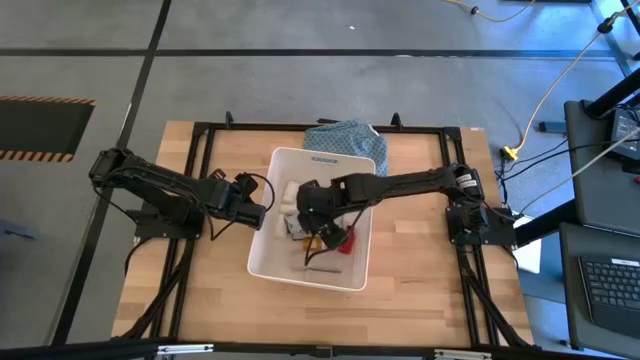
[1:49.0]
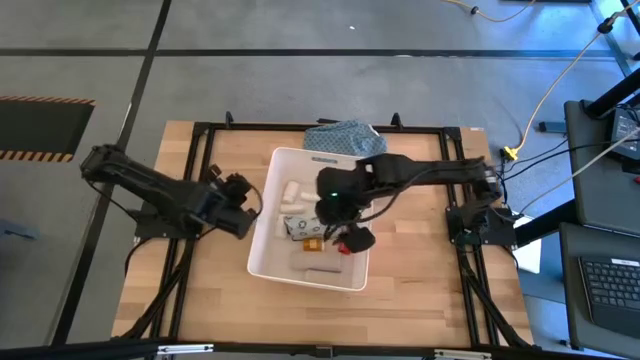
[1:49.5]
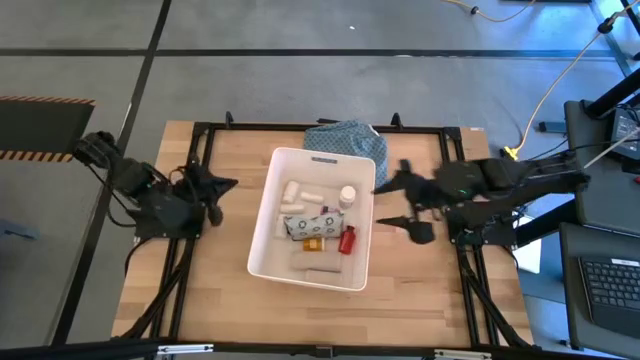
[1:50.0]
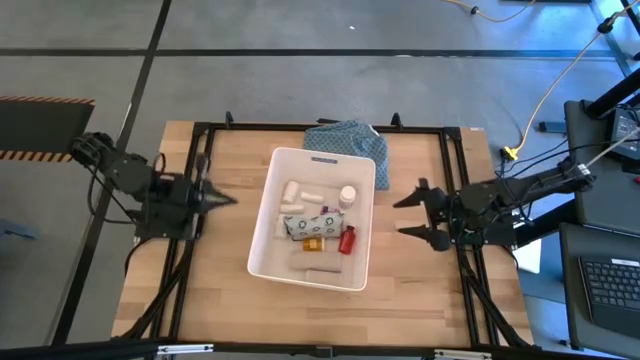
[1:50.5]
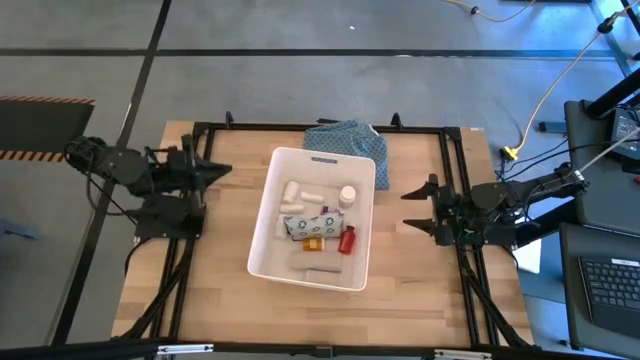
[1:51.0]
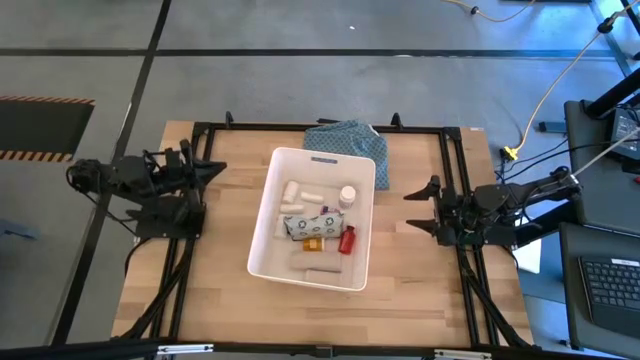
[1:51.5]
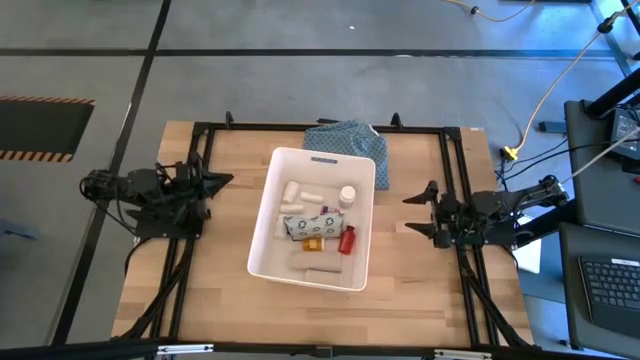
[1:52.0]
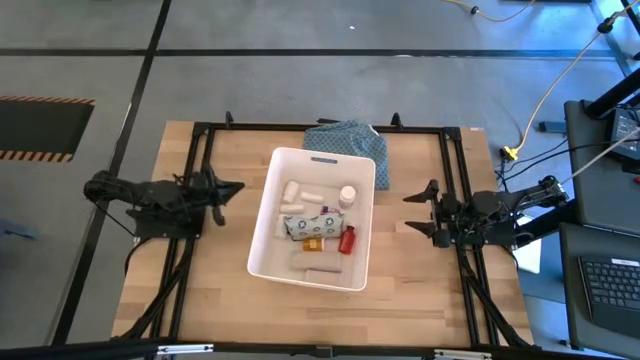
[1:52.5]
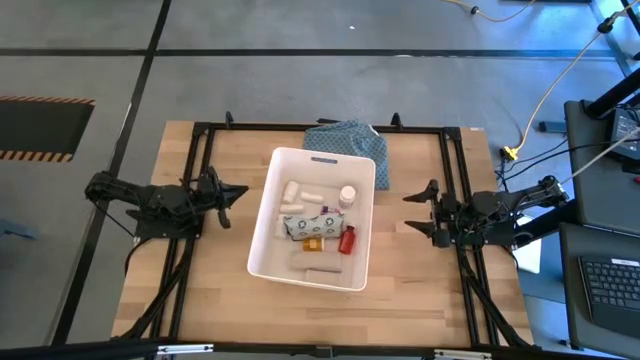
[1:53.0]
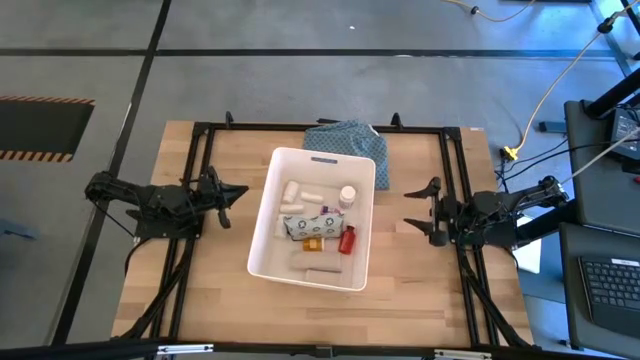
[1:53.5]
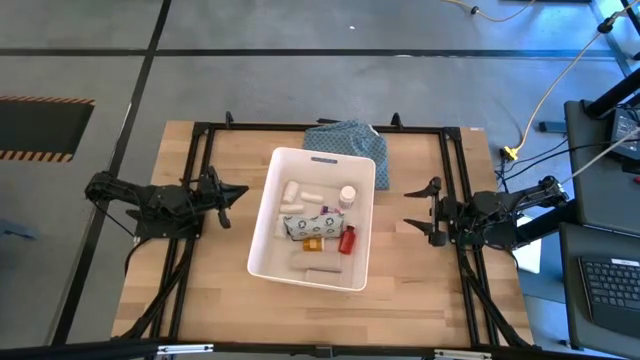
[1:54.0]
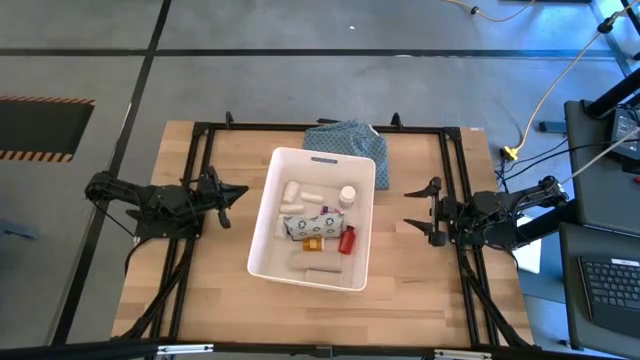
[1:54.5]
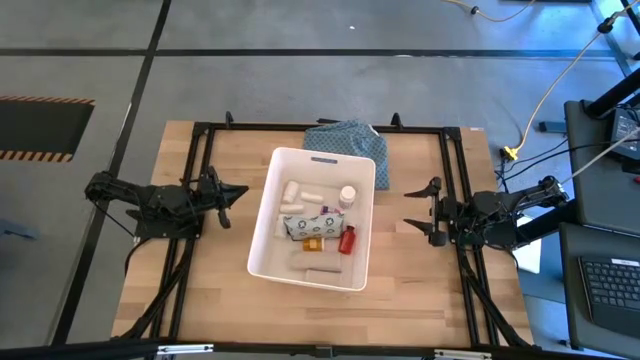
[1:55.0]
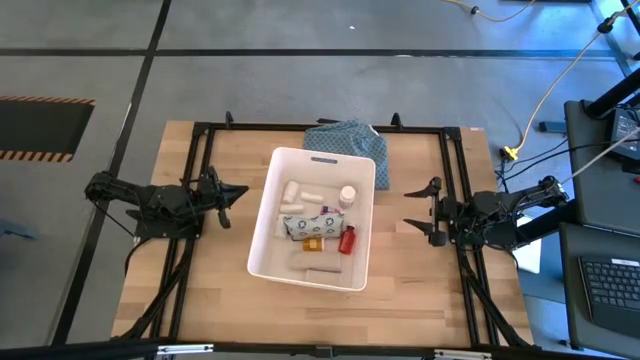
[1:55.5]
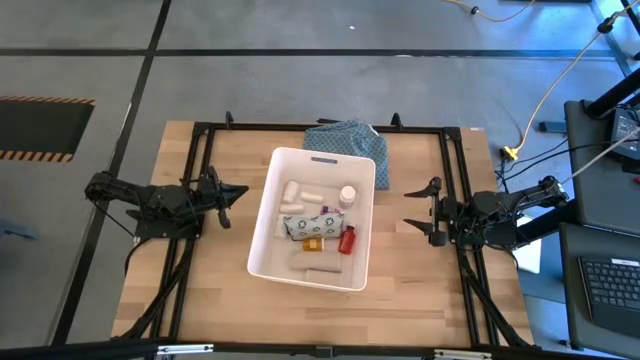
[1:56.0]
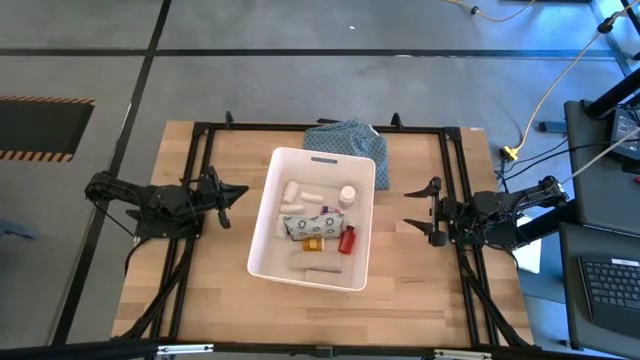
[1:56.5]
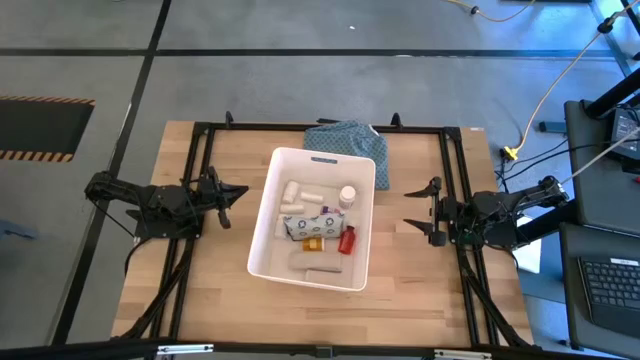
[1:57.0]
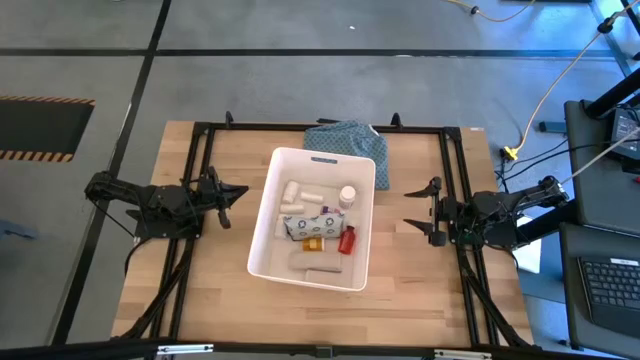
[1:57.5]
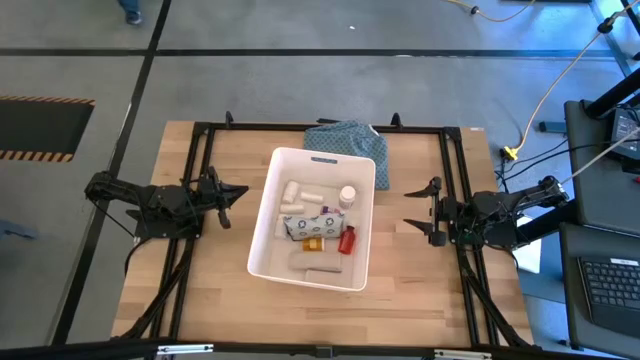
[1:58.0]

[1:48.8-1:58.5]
Task: Pick & place medical supplies in basket/bin
Return to Home Position

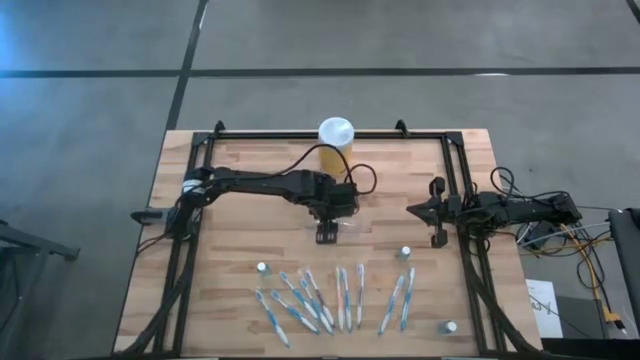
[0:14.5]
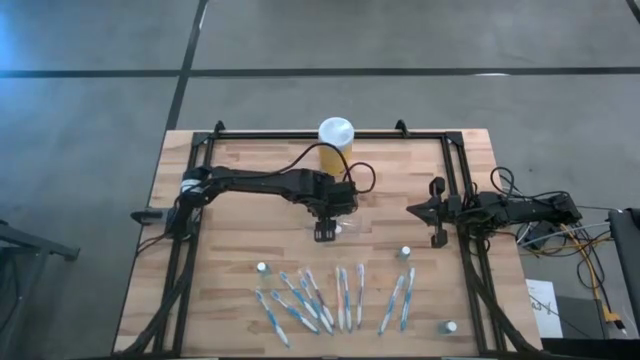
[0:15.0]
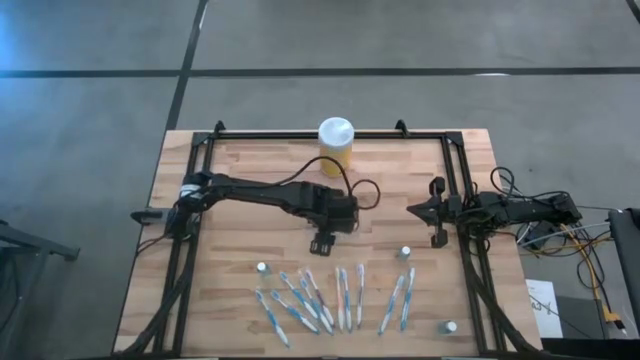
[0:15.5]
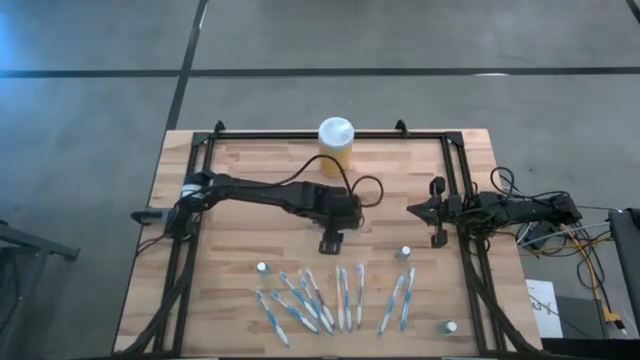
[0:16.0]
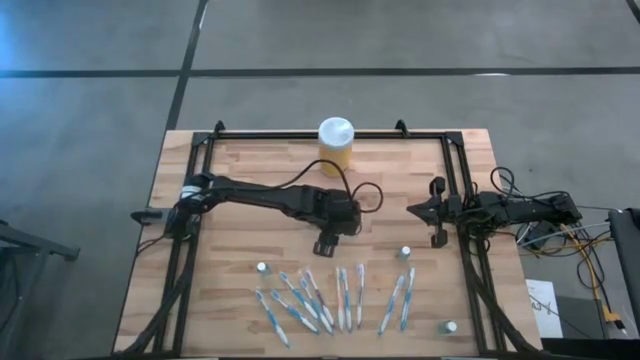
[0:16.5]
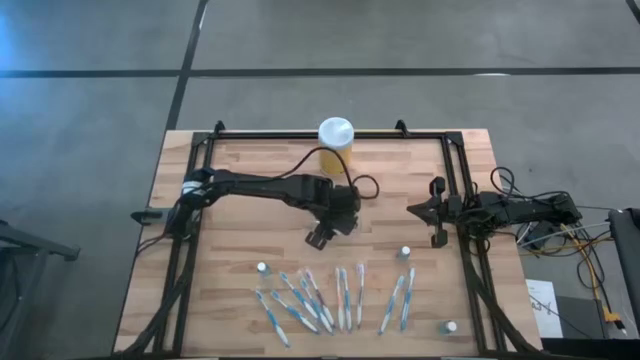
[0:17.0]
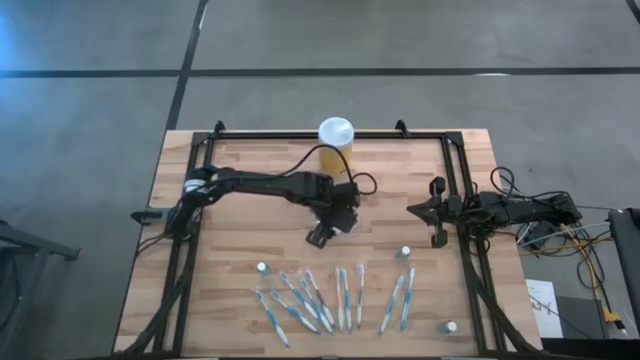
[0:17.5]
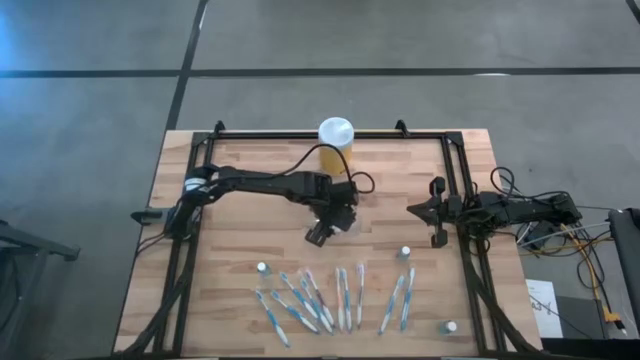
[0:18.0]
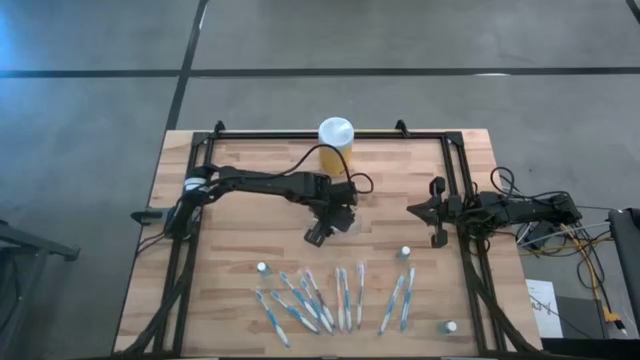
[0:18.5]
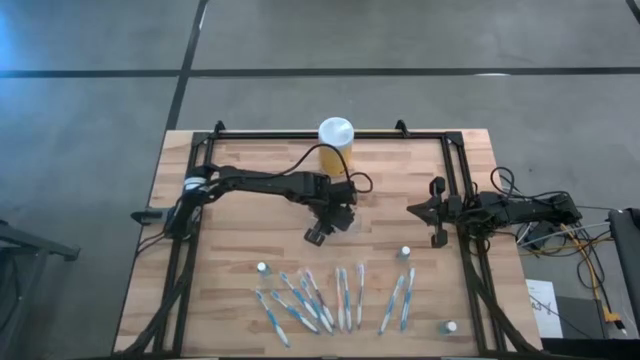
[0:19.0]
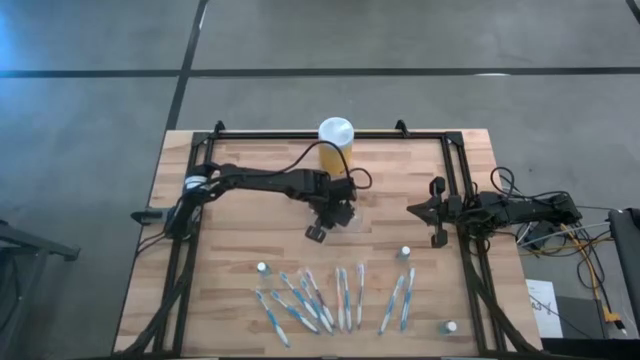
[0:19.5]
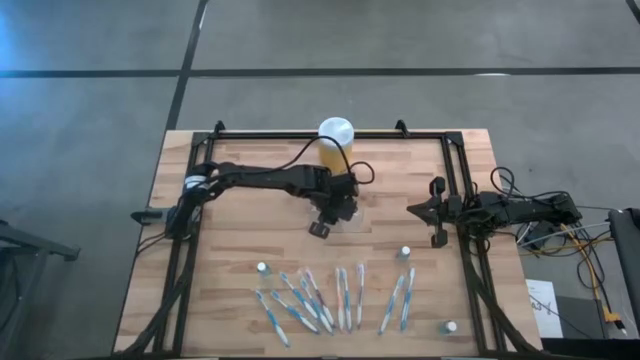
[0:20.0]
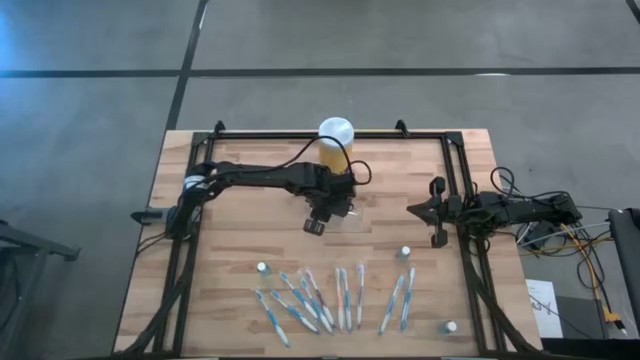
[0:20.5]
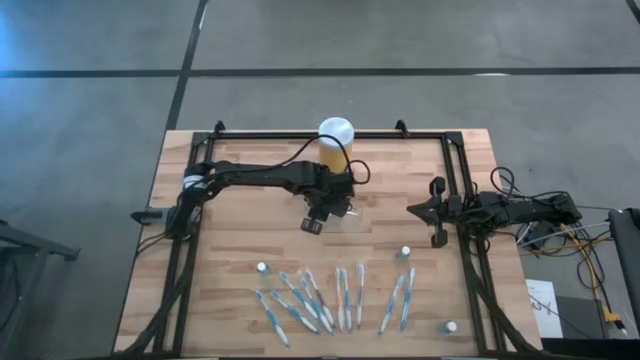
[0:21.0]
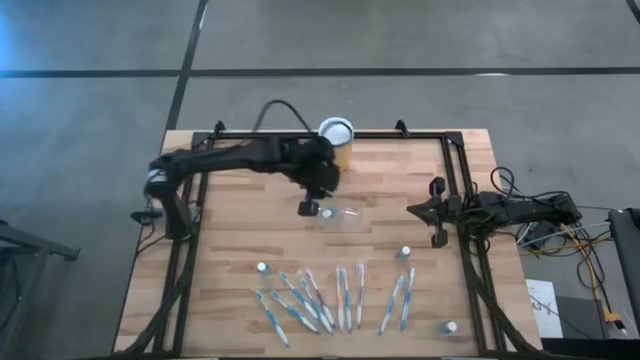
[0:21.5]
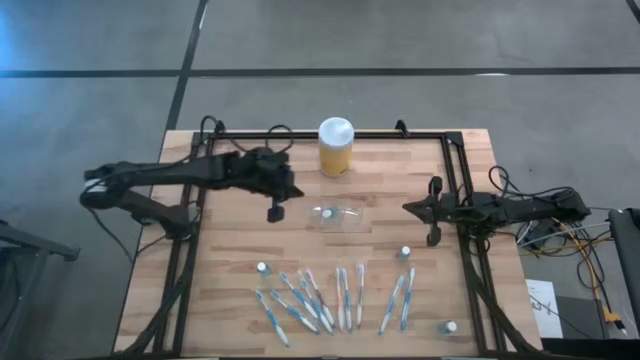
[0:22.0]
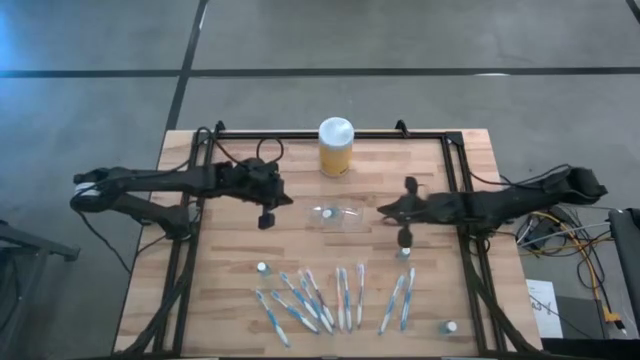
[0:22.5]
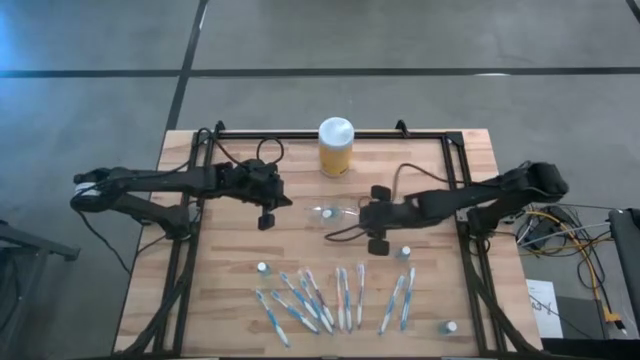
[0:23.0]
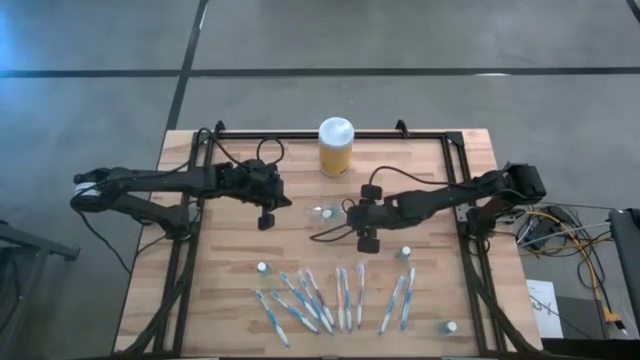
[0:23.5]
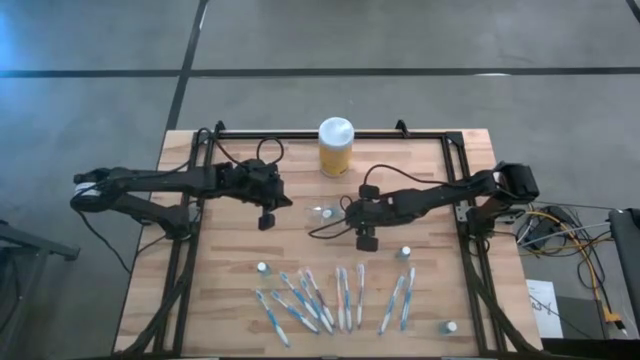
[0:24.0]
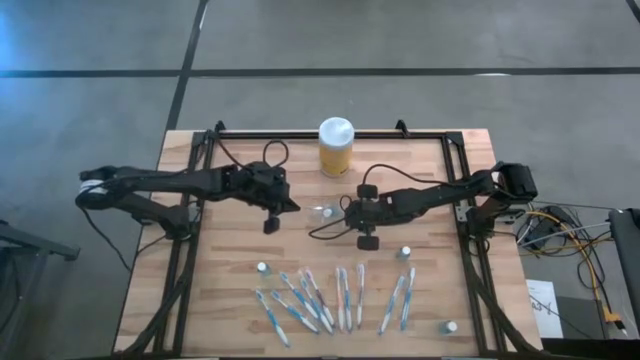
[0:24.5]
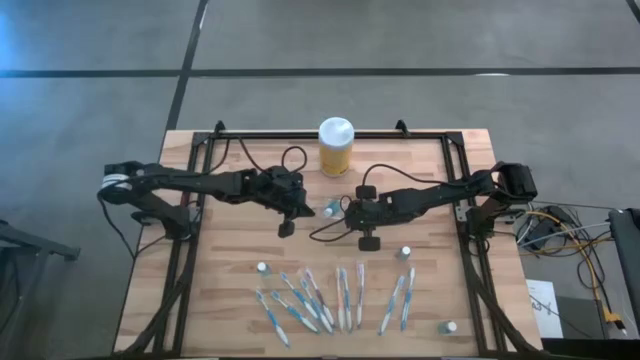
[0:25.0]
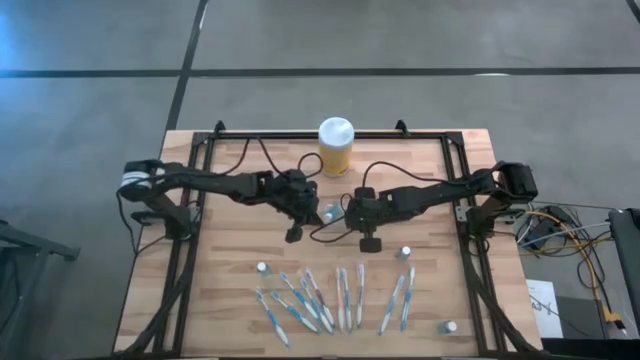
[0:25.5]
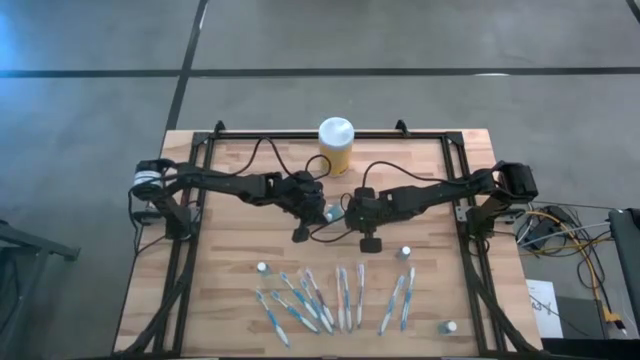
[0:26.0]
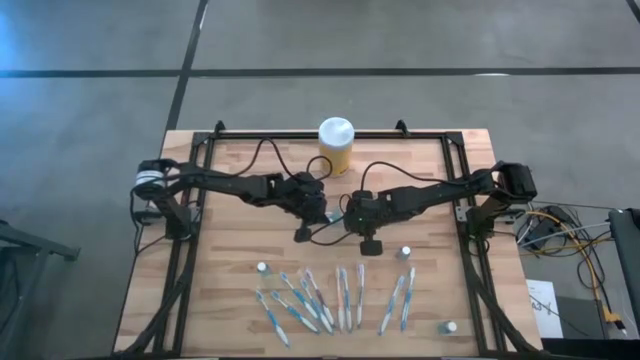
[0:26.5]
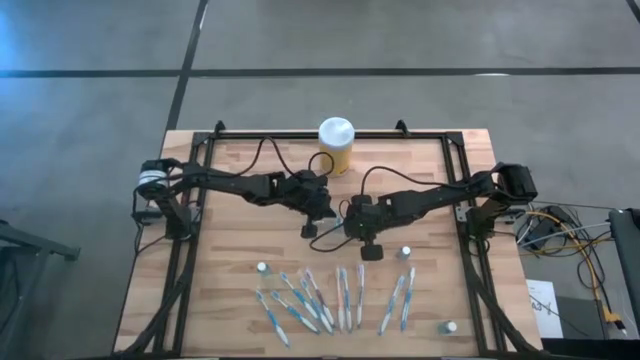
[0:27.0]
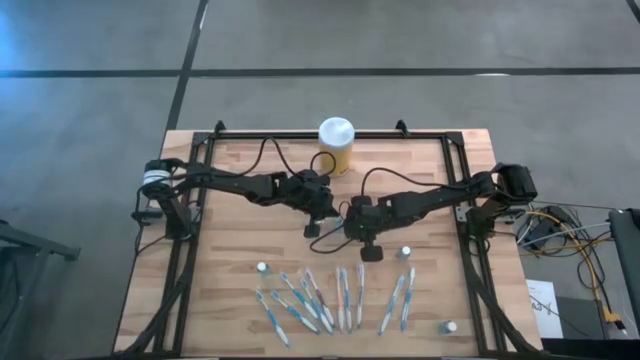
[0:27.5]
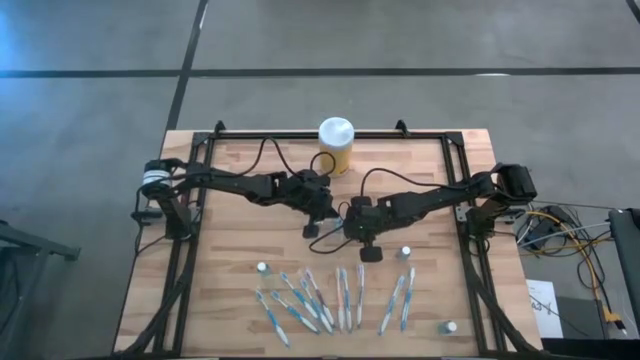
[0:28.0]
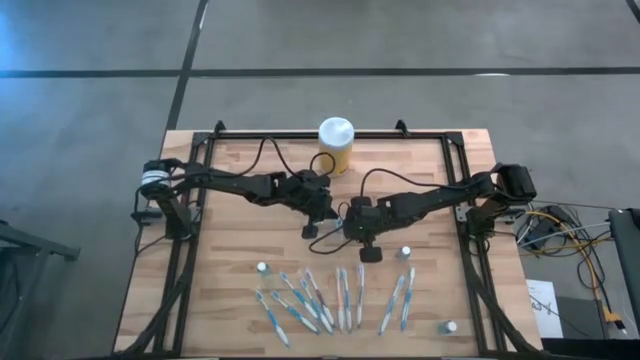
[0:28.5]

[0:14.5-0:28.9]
Task: Pick & Place toothbrushing station
Put the blue mouthwash into the transparent organizer
